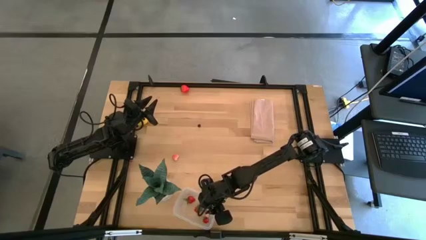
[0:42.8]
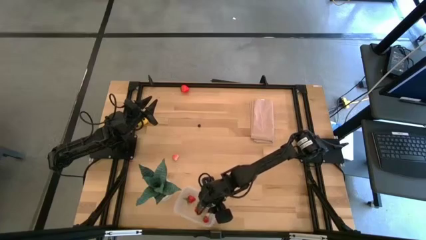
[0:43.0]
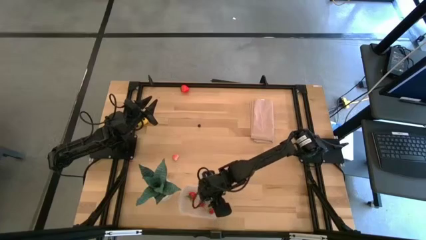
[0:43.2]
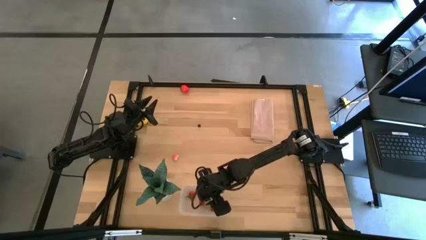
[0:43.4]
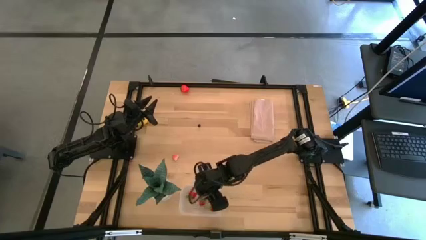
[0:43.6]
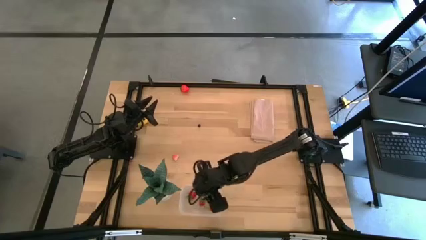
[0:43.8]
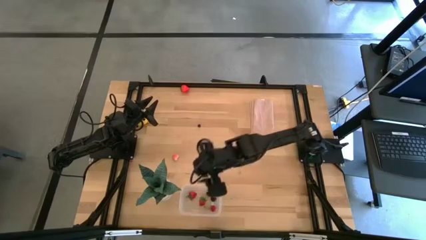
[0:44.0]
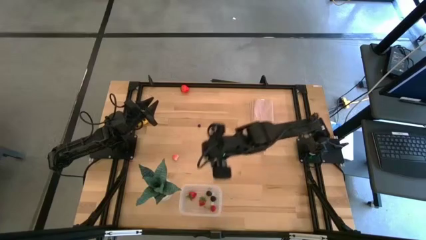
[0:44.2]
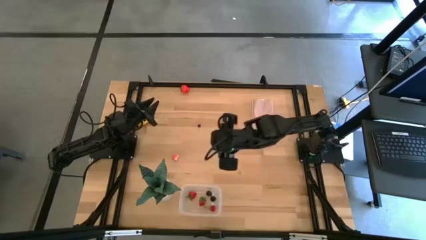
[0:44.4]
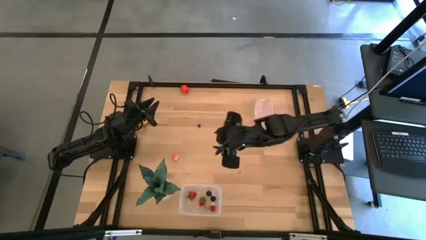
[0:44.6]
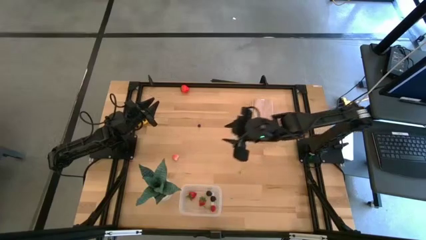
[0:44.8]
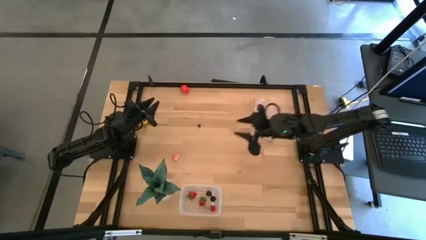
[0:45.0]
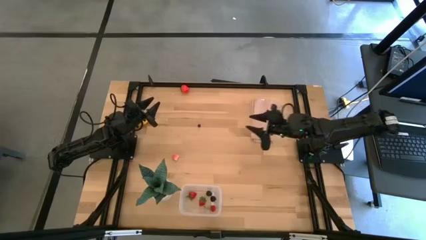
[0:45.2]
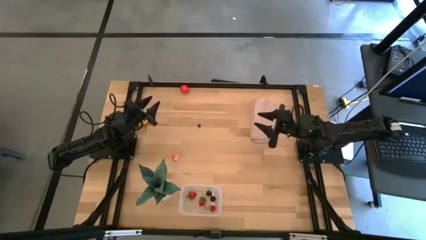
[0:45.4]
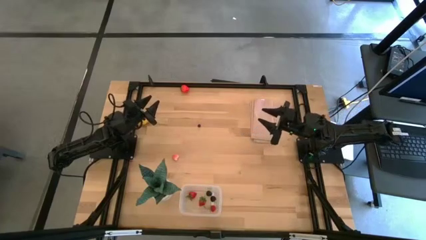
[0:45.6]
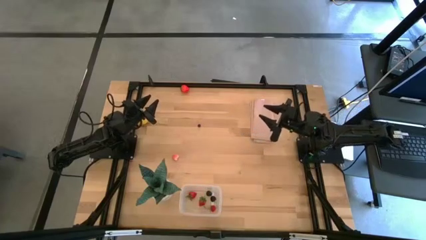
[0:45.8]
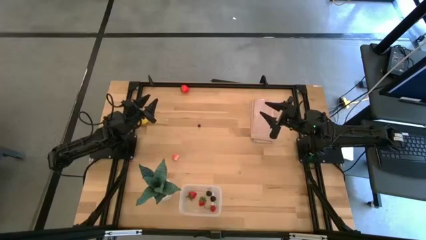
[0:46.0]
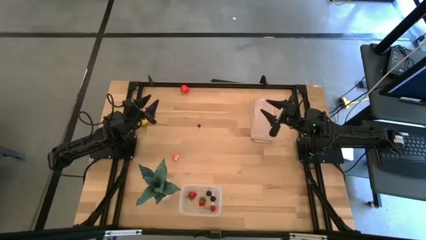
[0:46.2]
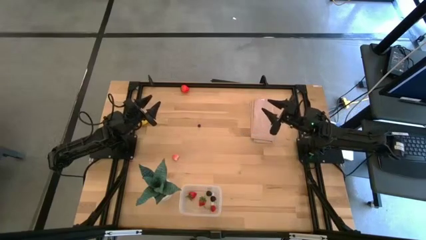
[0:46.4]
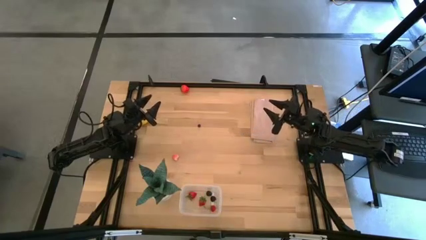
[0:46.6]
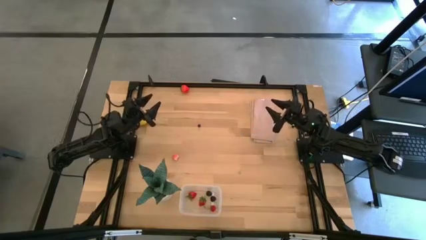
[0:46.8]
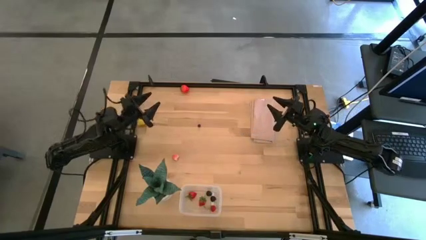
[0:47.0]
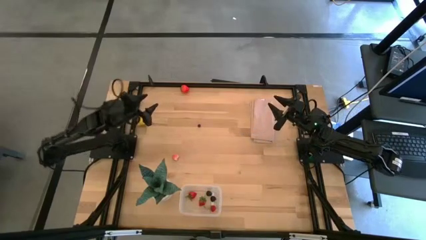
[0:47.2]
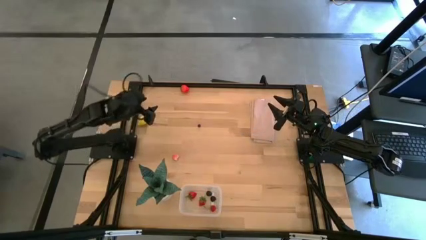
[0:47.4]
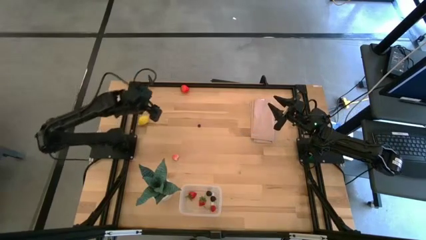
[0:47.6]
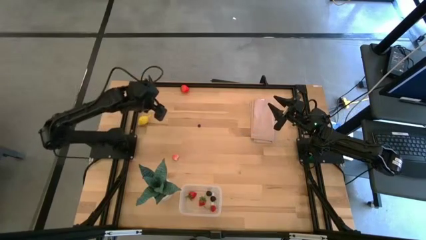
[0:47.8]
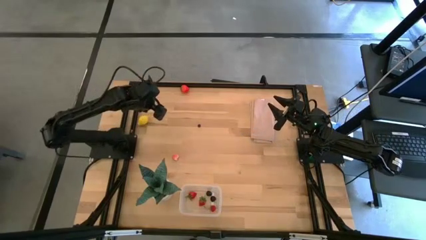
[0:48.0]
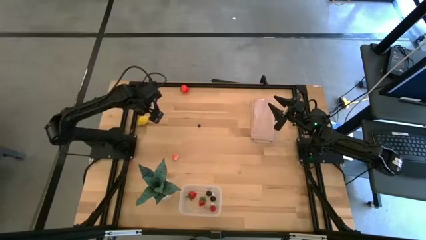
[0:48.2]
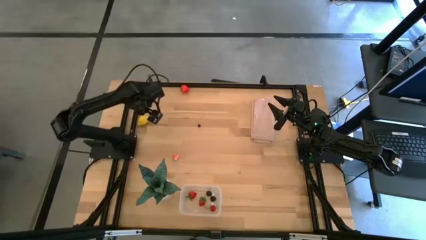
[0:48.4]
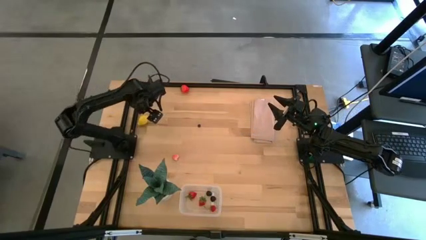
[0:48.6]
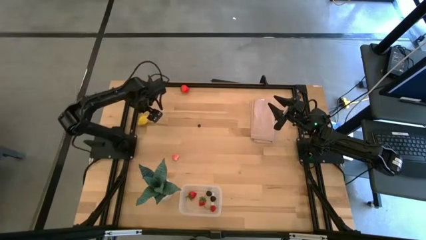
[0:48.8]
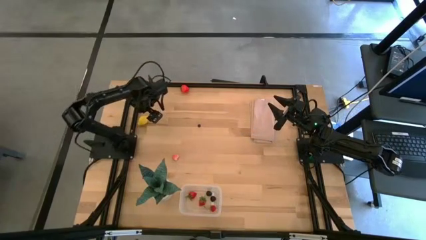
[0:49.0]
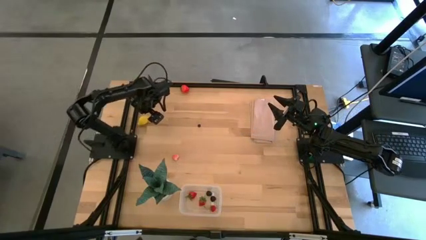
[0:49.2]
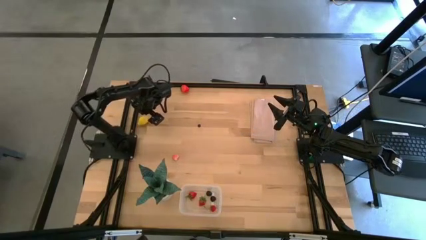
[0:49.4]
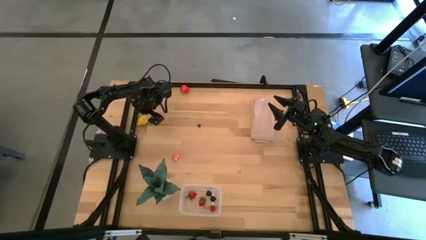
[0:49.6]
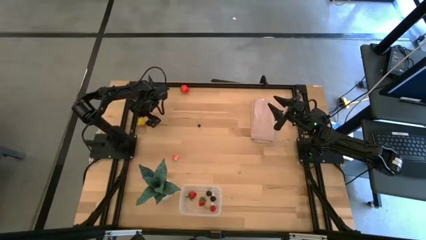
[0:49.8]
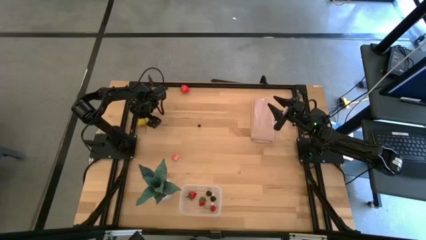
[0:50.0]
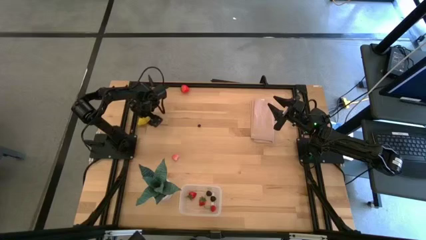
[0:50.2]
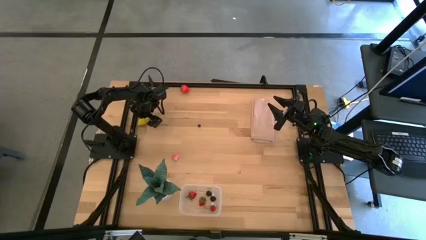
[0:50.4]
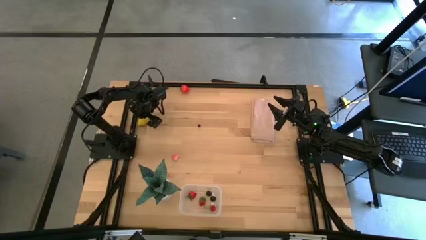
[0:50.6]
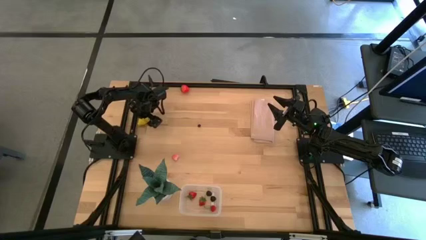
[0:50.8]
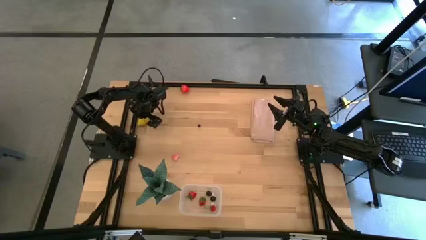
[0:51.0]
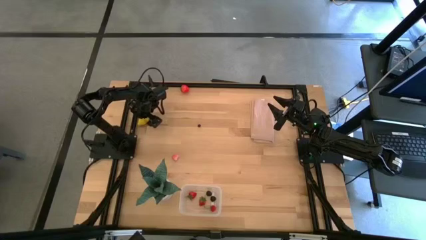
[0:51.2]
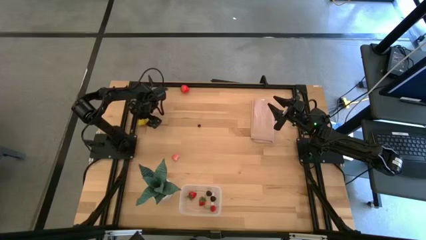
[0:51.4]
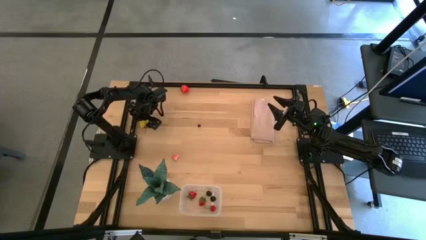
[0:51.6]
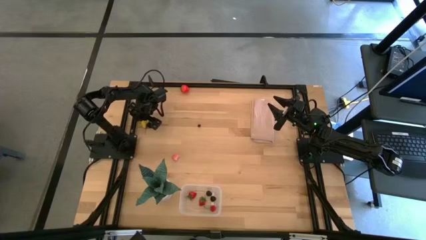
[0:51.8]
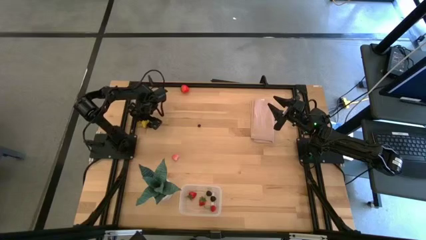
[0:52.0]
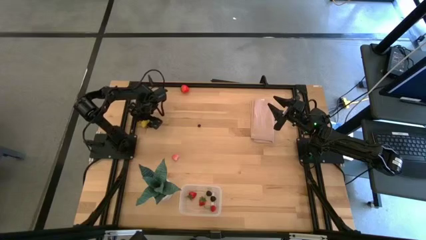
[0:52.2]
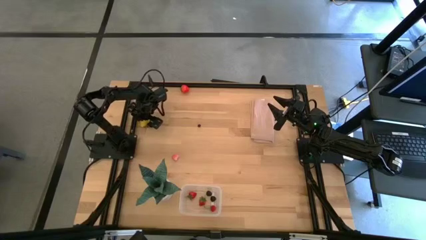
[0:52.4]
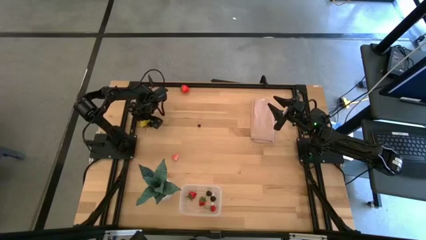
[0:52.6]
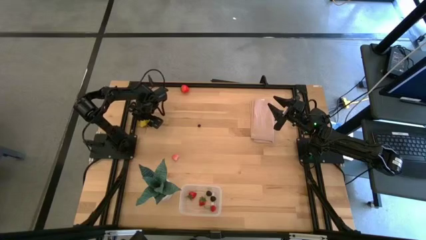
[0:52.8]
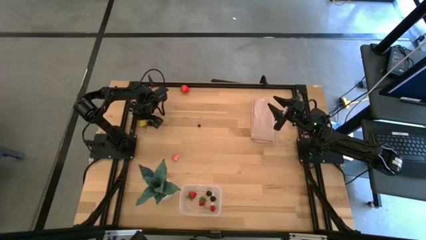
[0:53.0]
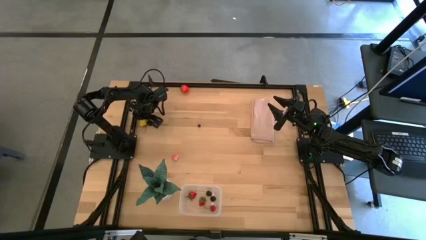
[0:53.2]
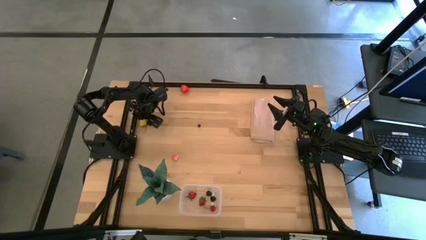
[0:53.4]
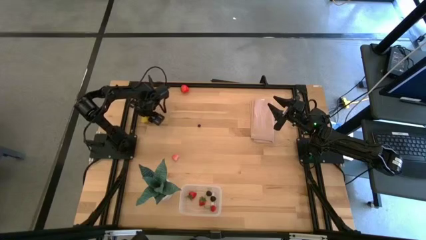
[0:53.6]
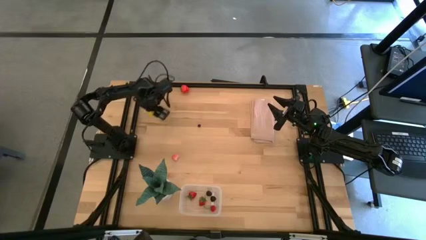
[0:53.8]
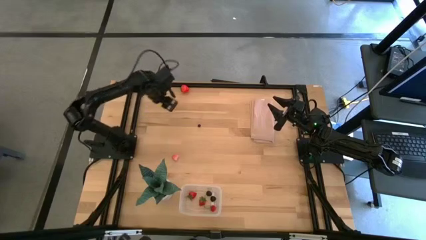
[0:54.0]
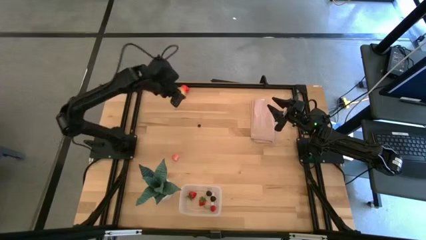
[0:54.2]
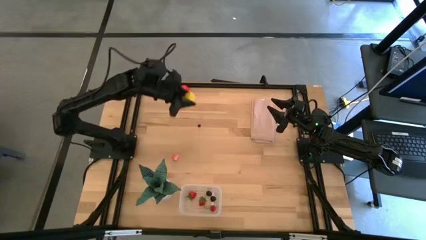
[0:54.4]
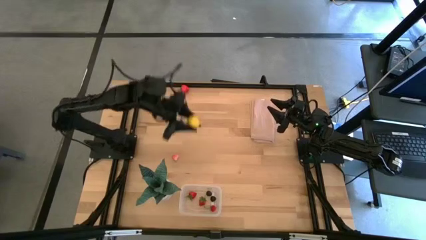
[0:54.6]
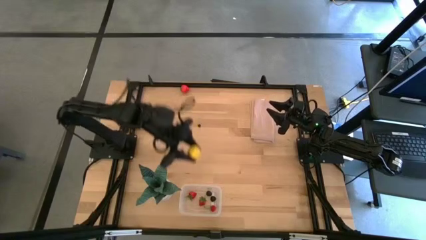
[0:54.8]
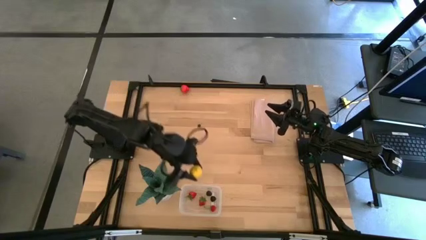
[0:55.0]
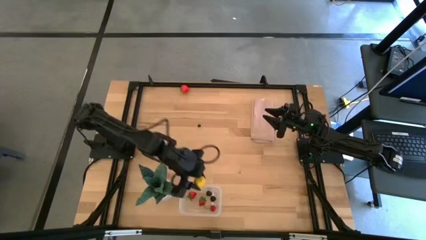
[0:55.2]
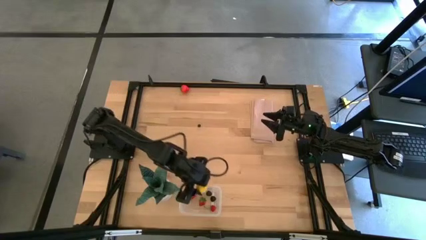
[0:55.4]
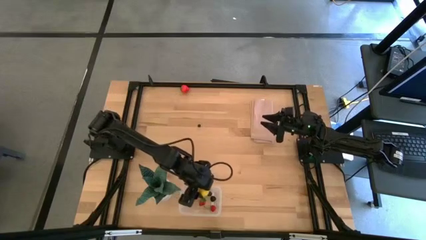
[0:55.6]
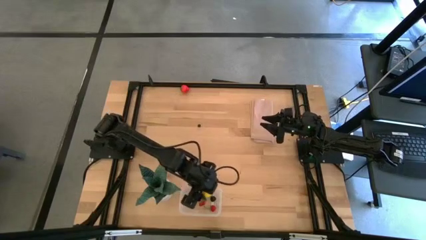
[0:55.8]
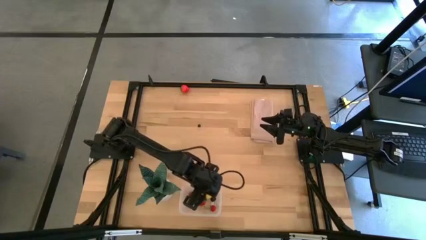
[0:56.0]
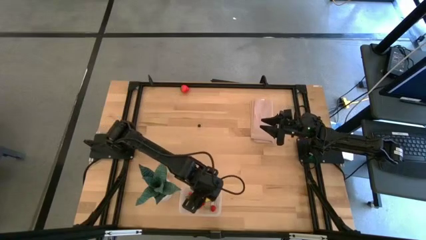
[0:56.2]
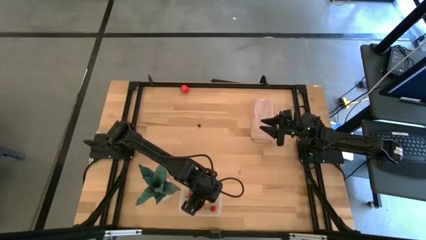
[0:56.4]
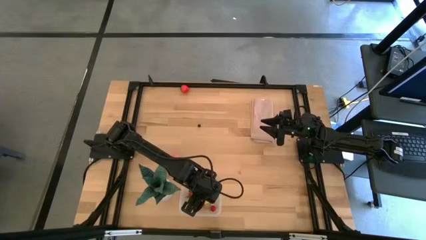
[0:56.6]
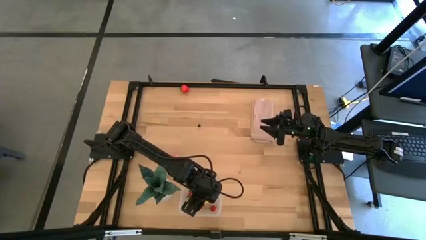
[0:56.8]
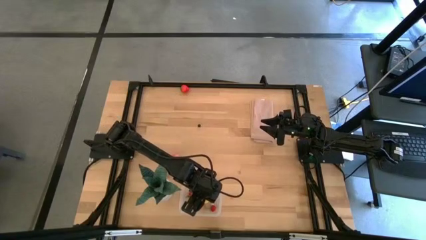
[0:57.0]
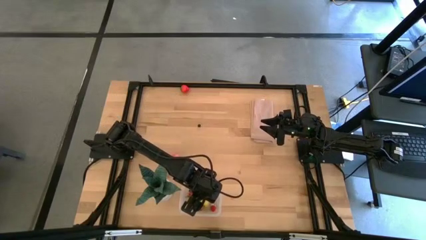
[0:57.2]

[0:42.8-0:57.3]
Task: Pick and placing Produce into tupperware
Put the yellow lemon into the transparent bin
